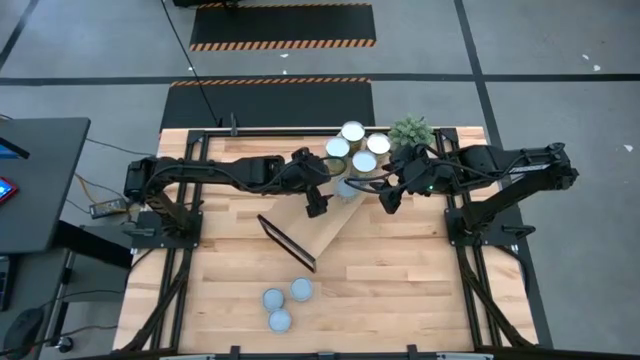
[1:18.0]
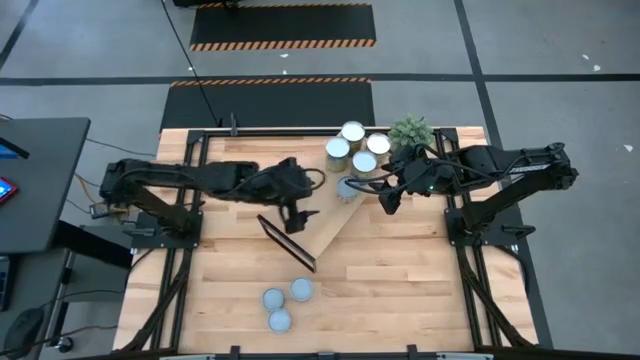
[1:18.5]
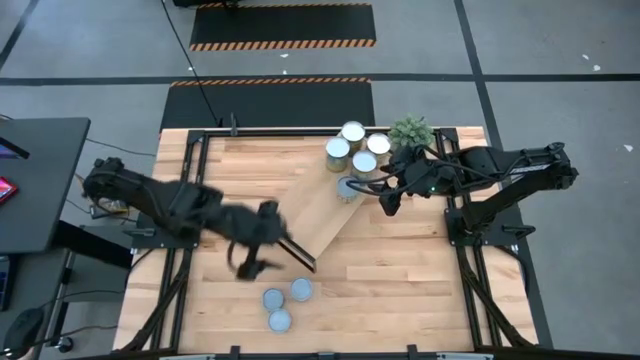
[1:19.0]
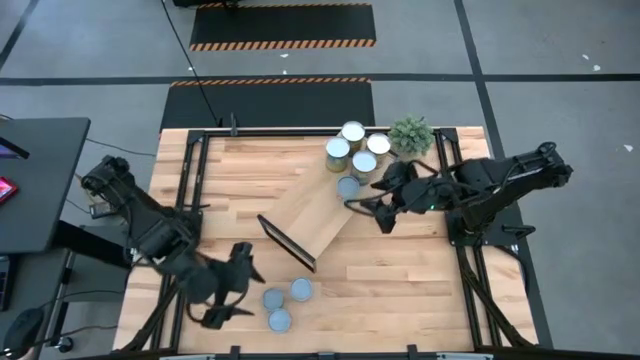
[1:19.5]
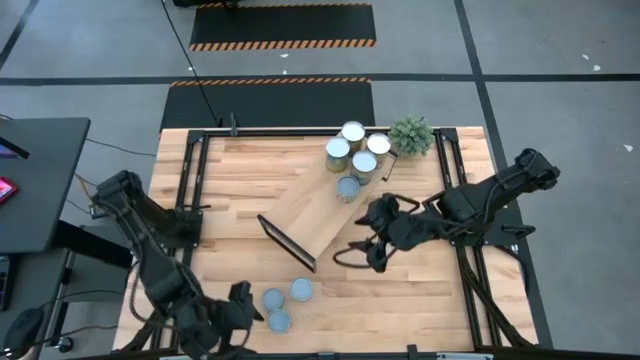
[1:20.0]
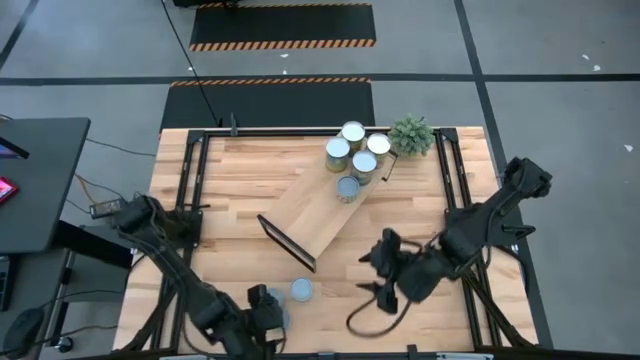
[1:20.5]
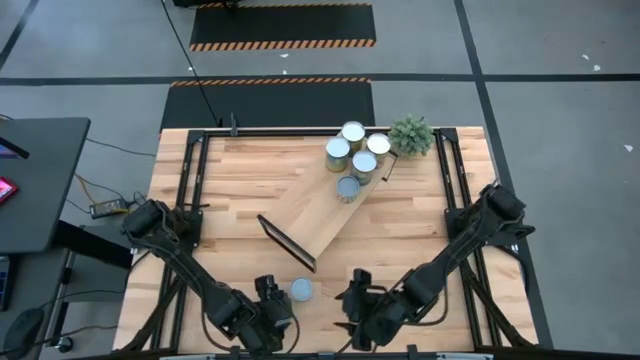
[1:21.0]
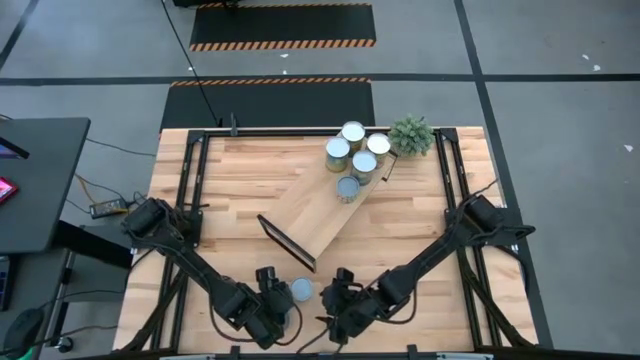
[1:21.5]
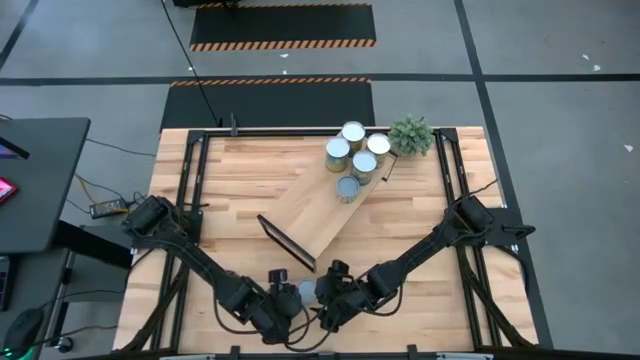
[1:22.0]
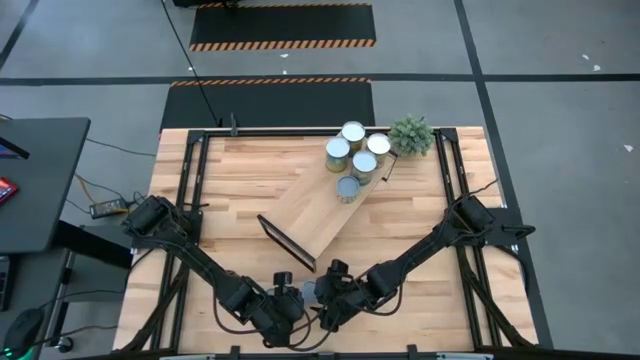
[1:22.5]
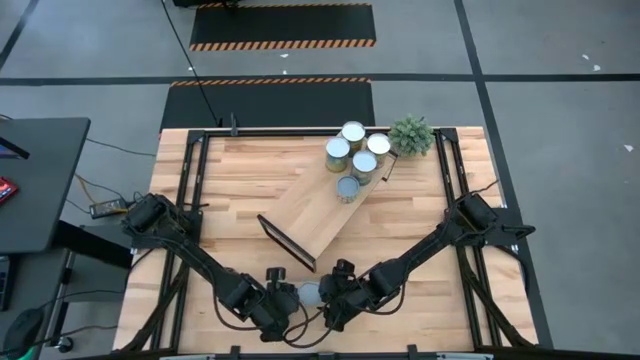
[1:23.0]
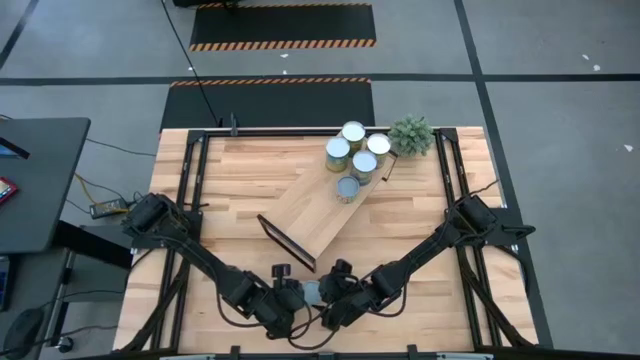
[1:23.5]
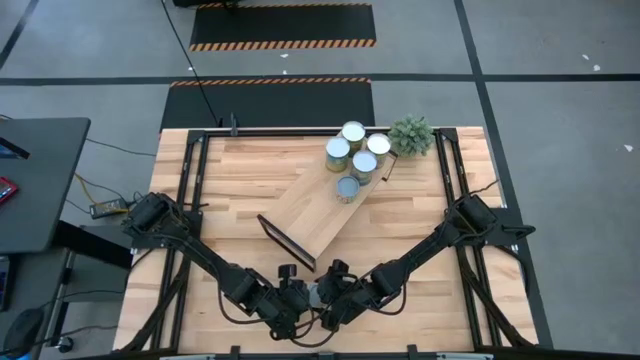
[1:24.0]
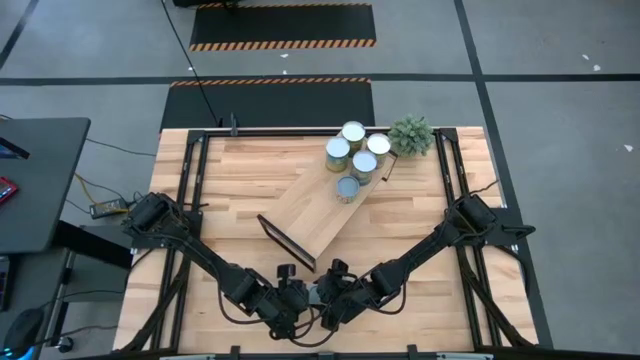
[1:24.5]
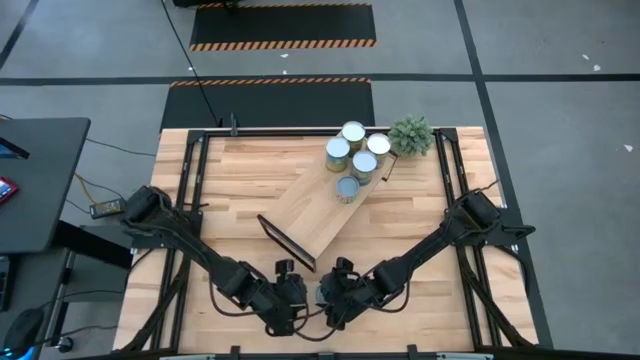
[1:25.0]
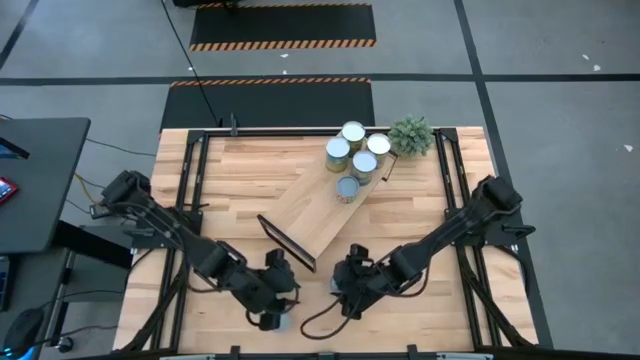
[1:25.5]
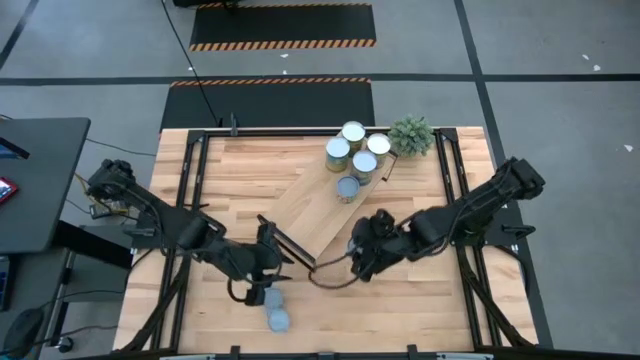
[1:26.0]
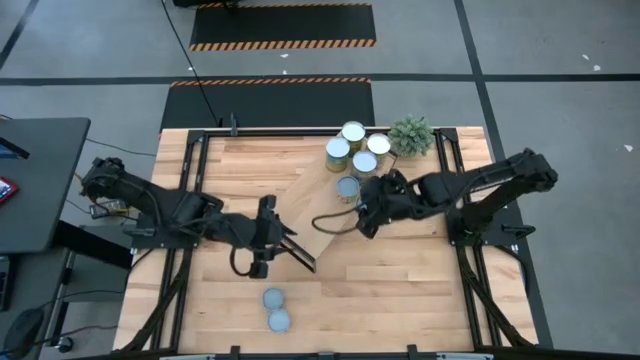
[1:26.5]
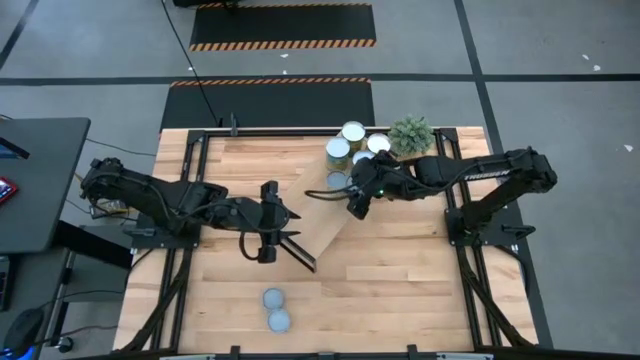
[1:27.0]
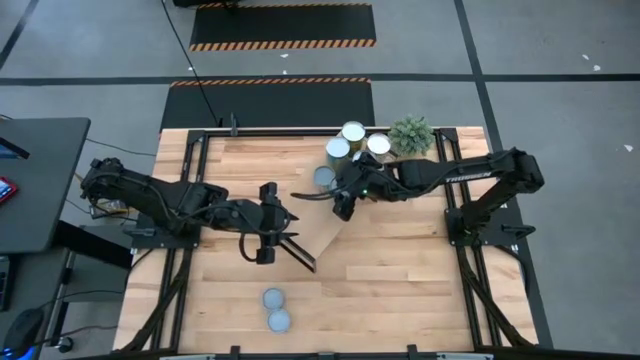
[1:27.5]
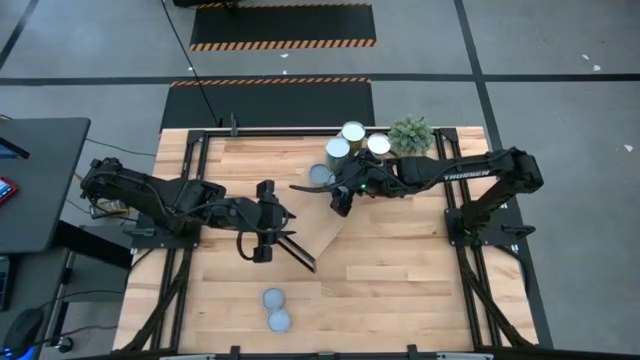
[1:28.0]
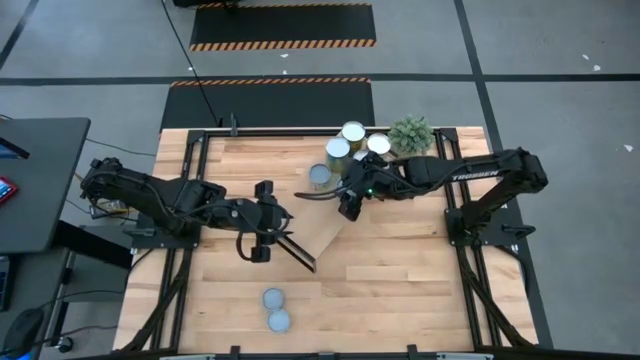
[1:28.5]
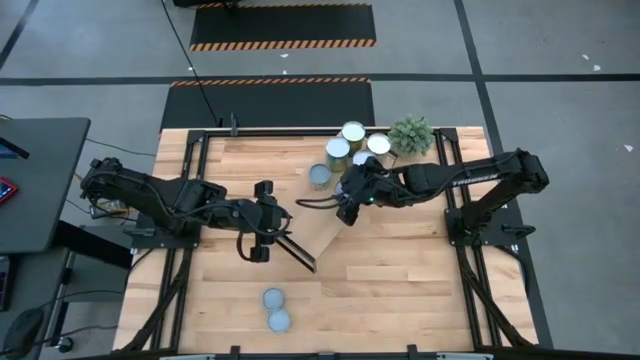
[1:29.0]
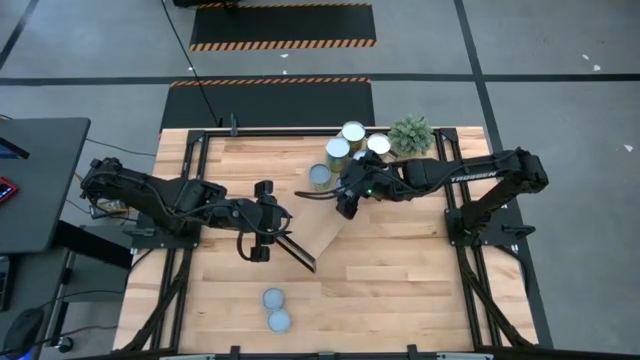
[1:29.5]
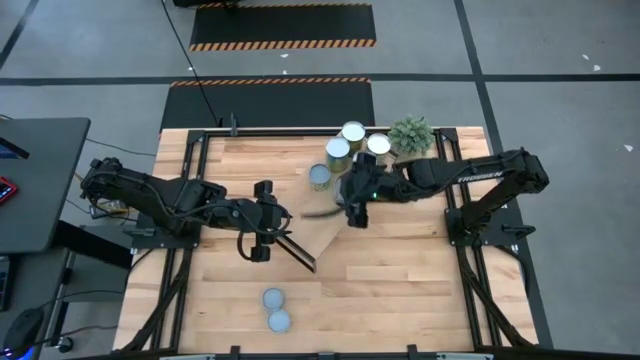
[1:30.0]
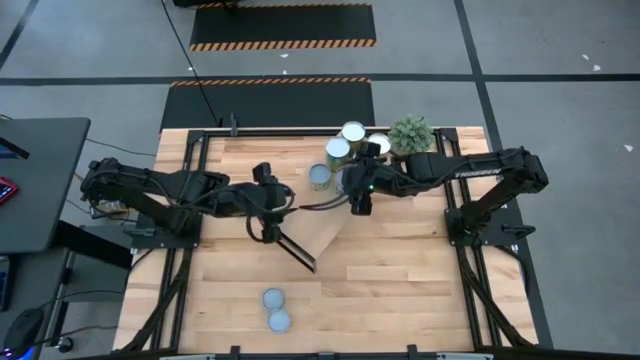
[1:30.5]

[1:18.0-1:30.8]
Task: Pick and place cans onto a shelf
Put the canned mixed vegetables on the shelf

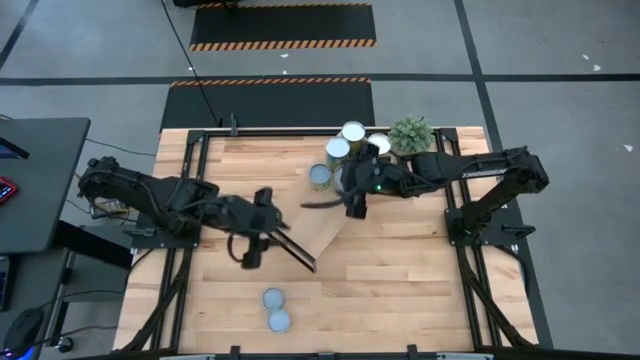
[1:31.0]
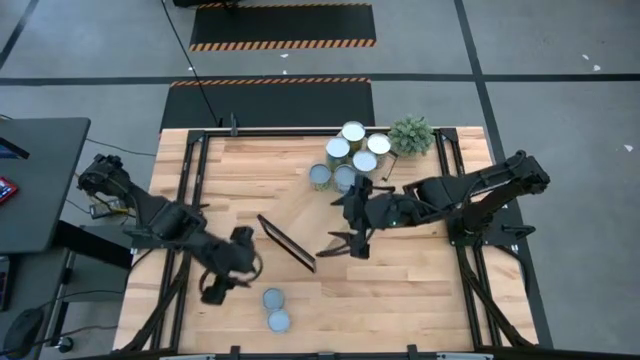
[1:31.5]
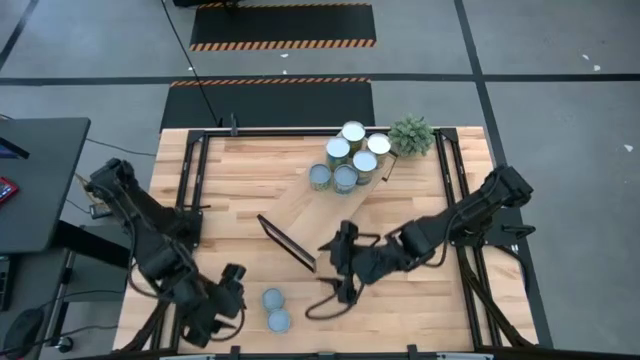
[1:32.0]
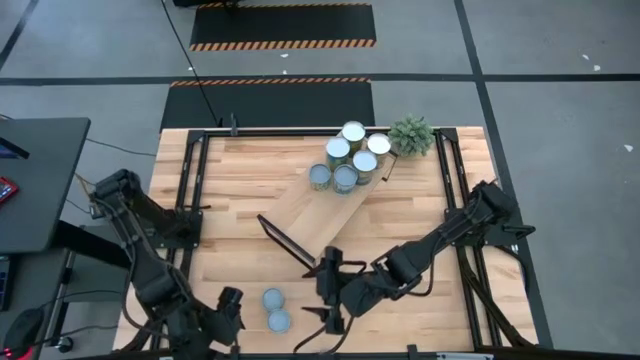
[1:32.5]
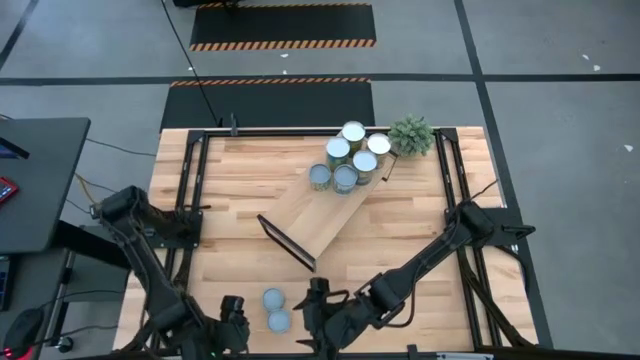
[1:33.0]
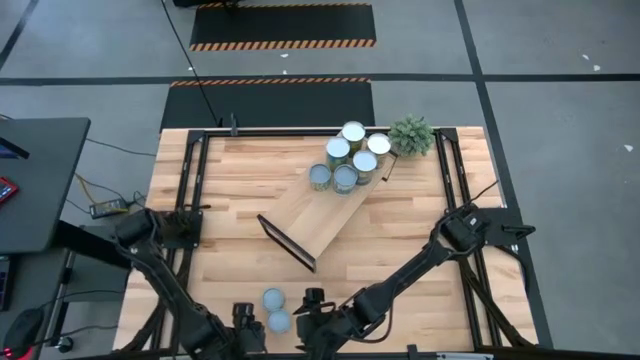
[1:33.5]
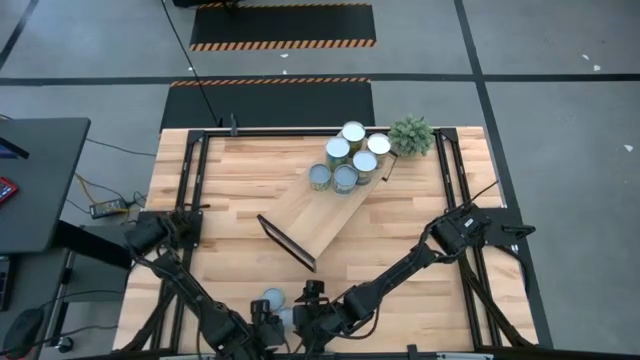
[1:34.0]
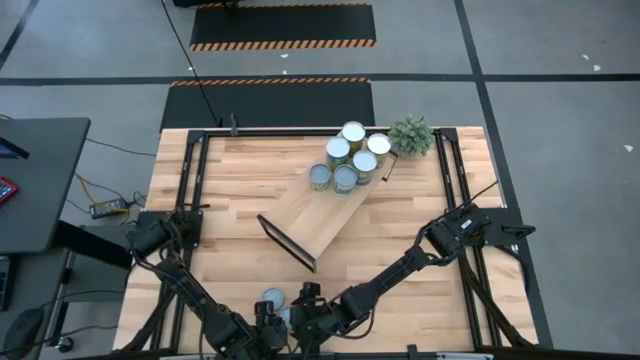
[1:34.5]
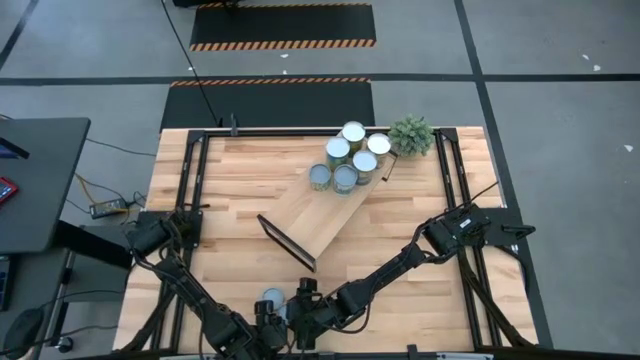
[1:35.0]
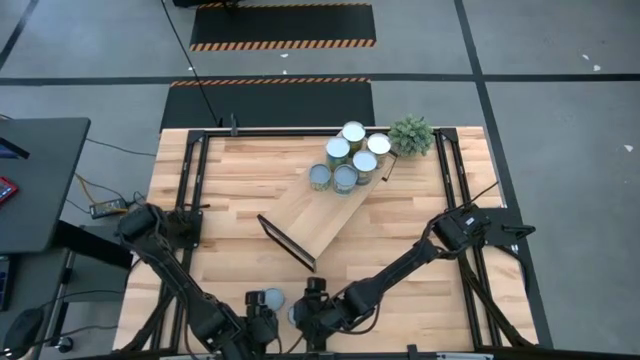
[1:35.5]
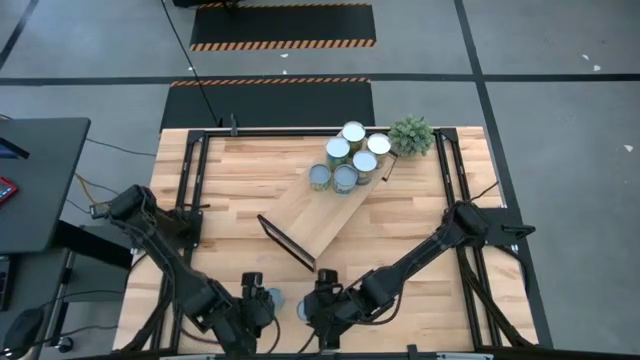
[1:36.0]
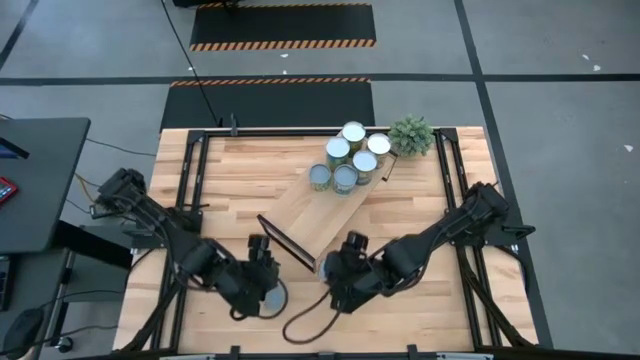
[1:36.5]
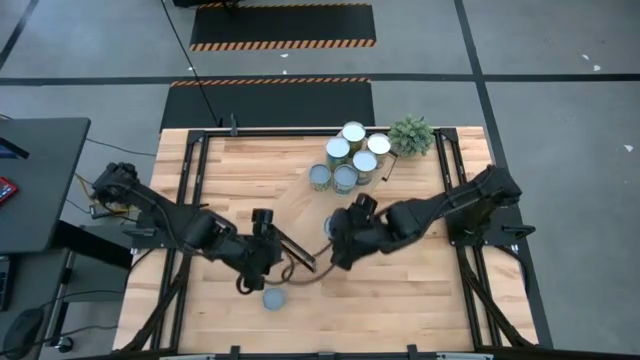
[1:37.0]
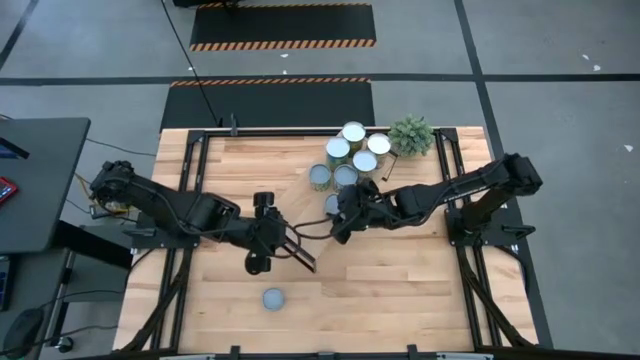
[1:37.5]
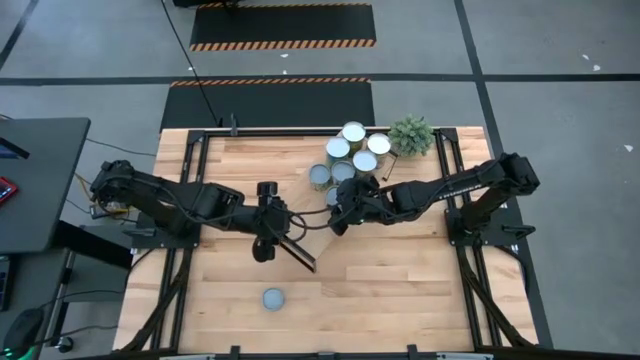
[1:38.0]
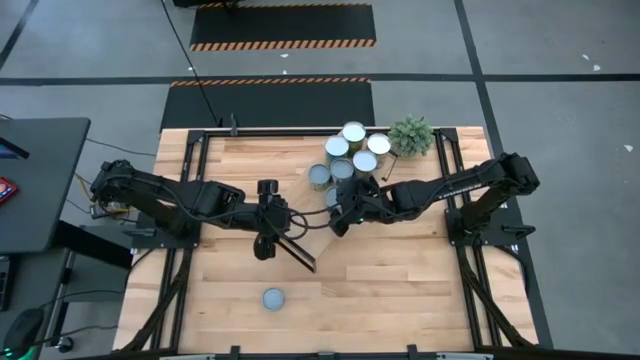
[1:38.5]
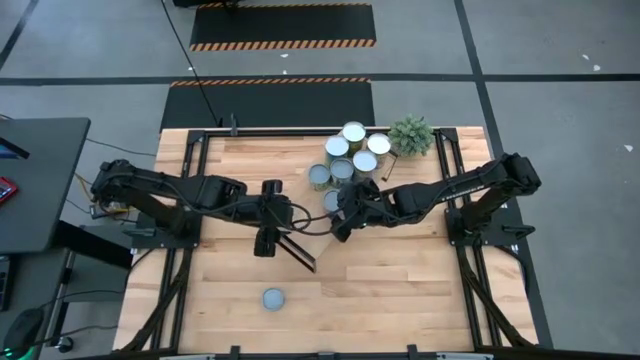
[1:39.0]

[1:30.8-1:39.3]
Put the canned diced tomatoes on the shelf

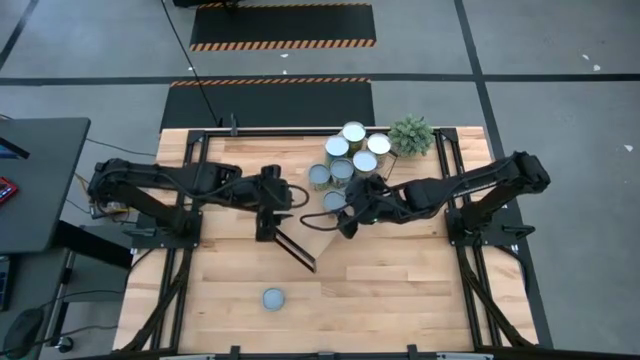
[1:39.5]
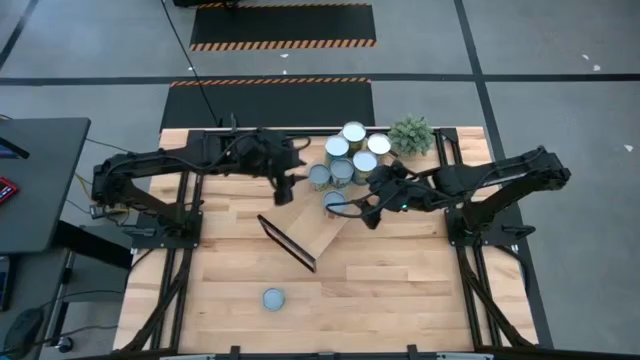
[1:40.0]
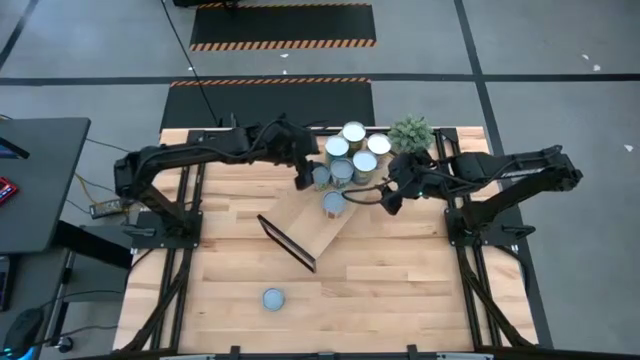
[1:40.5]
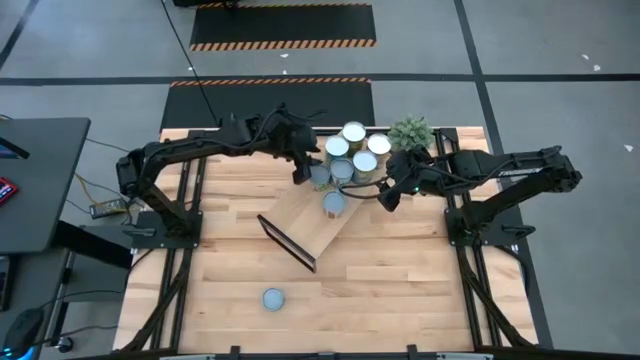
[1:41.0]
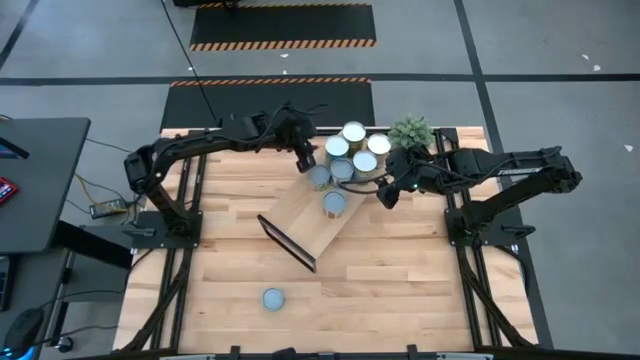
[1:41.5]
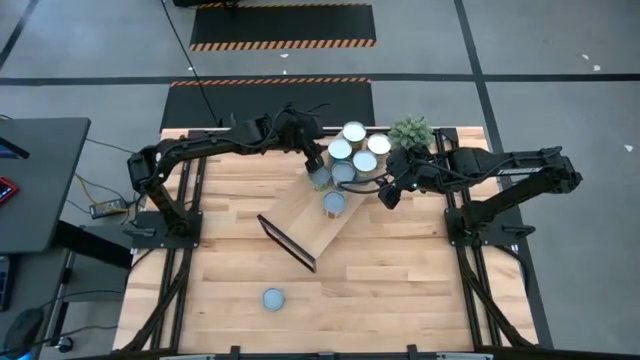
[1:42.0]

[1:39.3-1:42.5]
Adjust the canned carrots on the shelf
